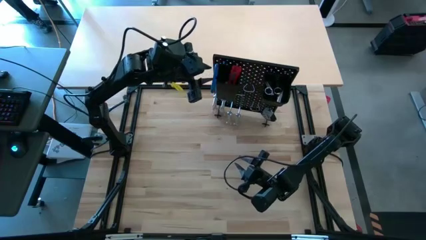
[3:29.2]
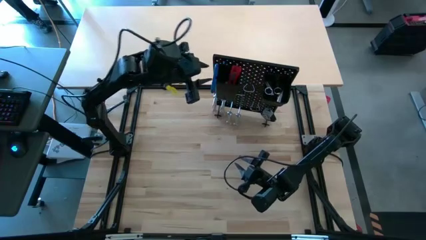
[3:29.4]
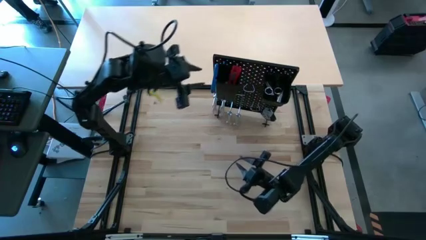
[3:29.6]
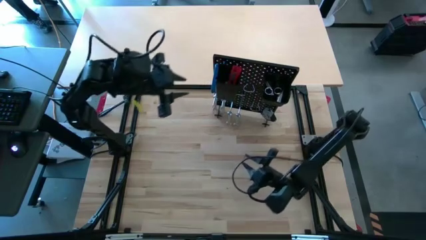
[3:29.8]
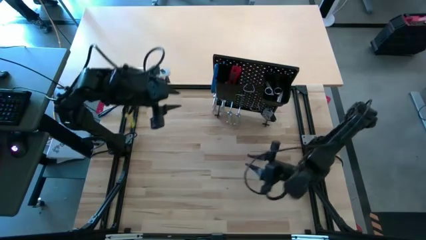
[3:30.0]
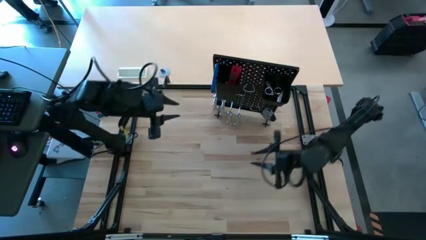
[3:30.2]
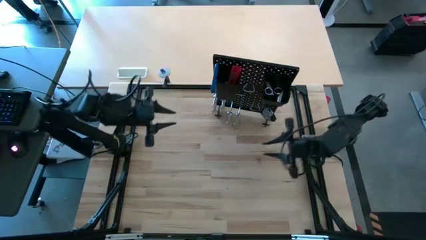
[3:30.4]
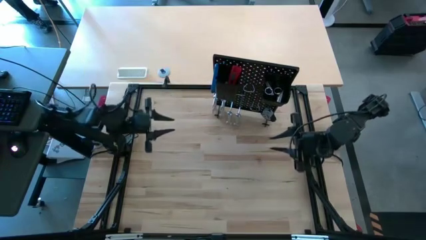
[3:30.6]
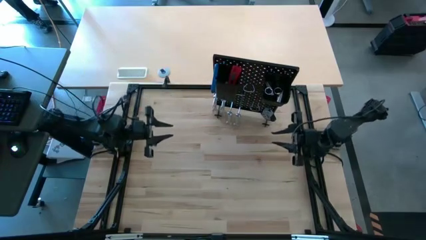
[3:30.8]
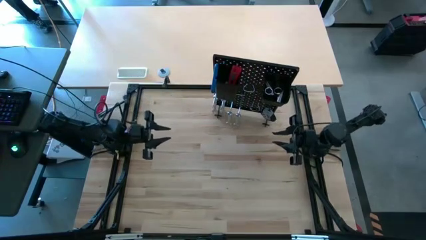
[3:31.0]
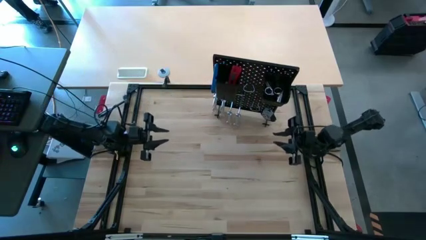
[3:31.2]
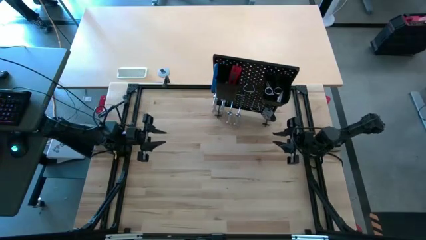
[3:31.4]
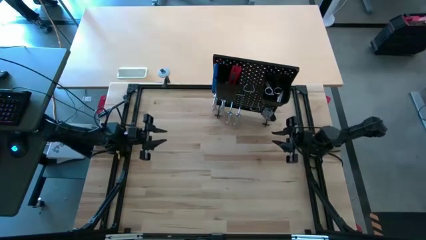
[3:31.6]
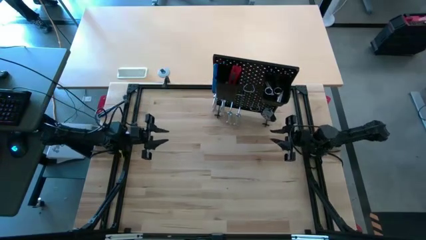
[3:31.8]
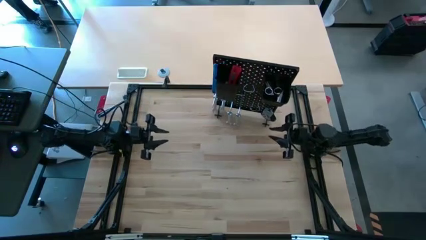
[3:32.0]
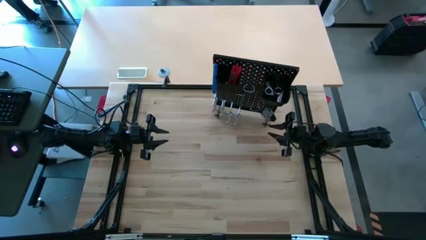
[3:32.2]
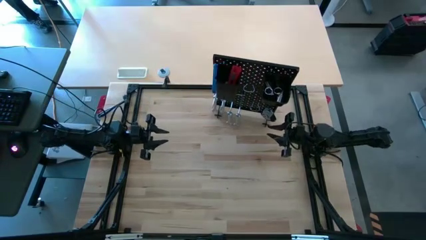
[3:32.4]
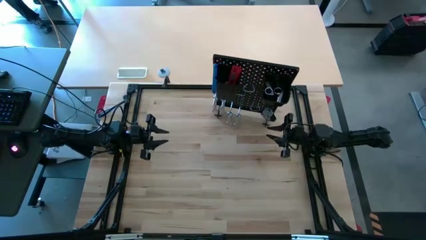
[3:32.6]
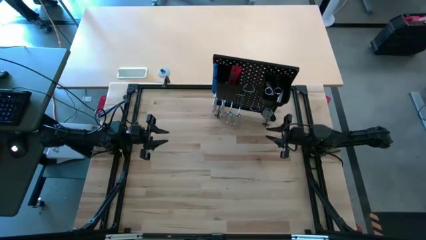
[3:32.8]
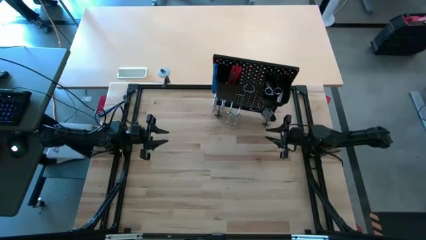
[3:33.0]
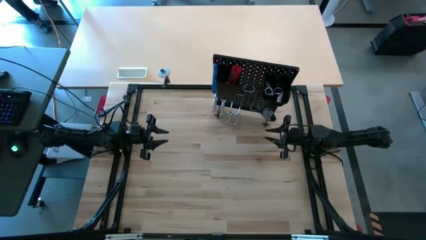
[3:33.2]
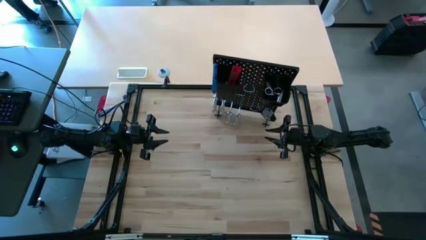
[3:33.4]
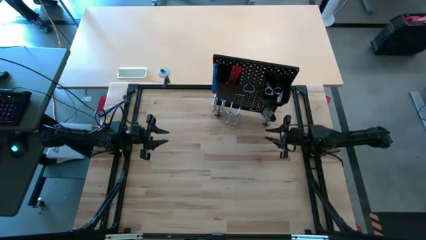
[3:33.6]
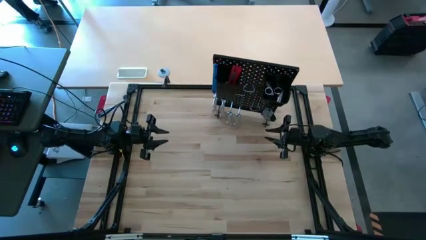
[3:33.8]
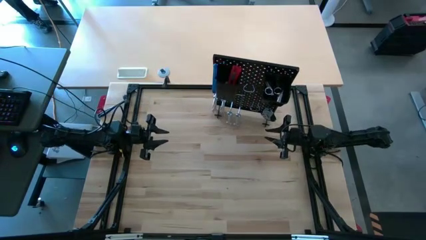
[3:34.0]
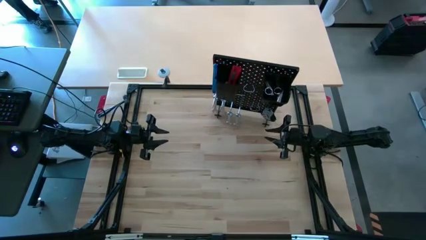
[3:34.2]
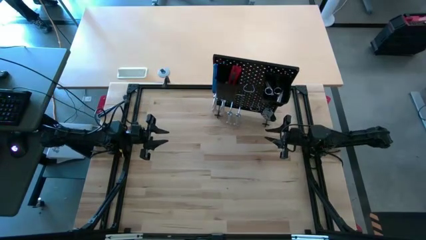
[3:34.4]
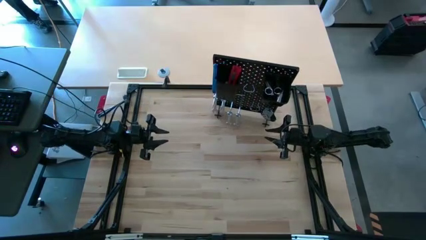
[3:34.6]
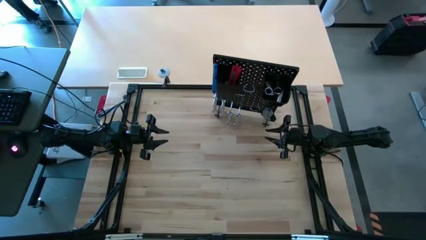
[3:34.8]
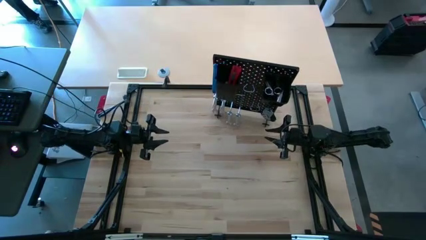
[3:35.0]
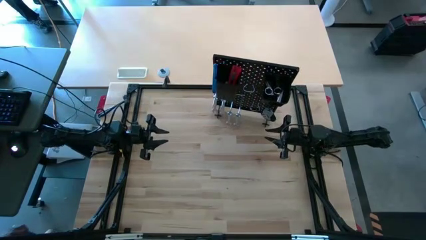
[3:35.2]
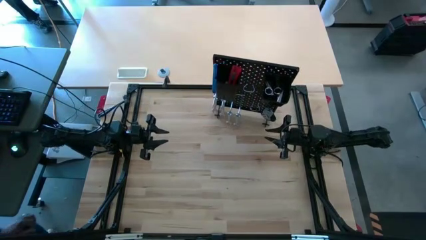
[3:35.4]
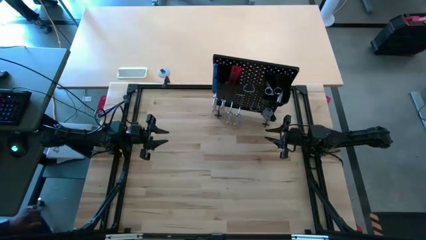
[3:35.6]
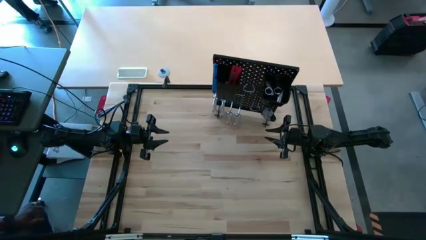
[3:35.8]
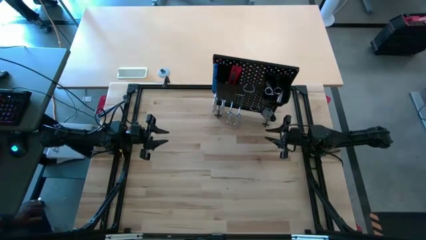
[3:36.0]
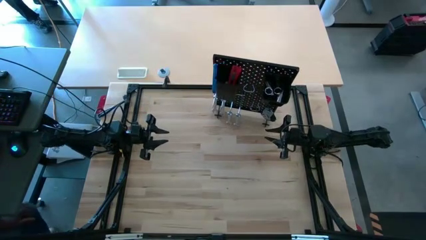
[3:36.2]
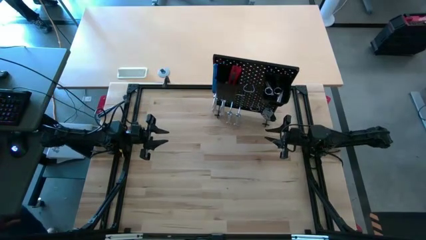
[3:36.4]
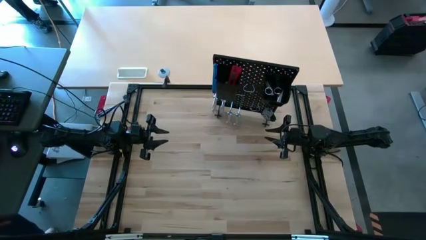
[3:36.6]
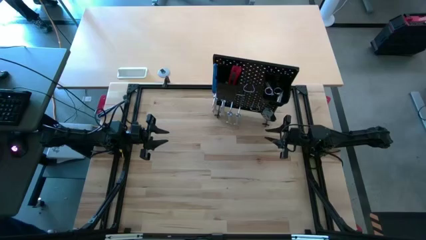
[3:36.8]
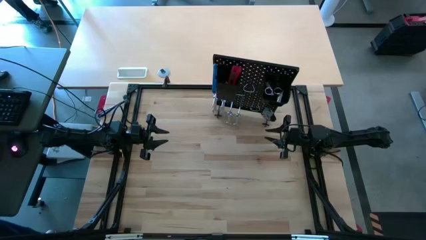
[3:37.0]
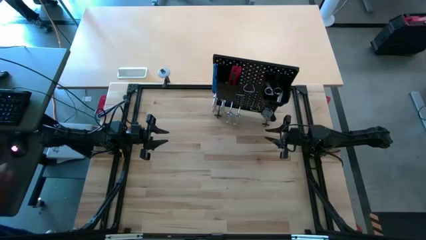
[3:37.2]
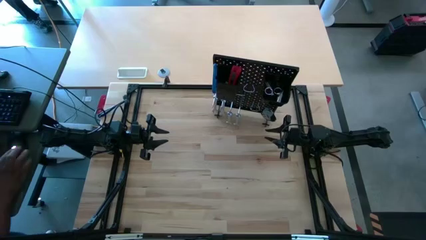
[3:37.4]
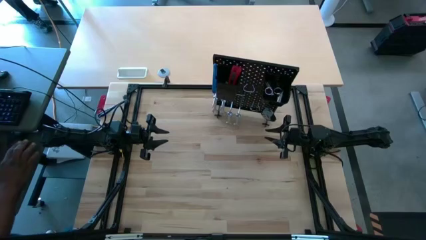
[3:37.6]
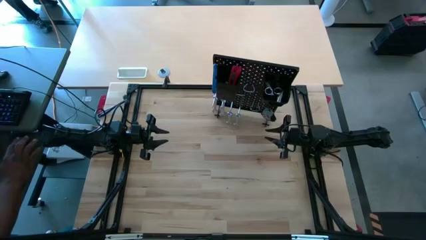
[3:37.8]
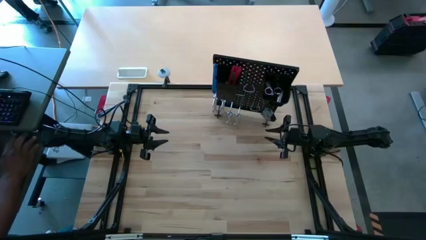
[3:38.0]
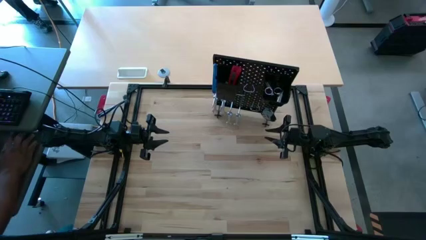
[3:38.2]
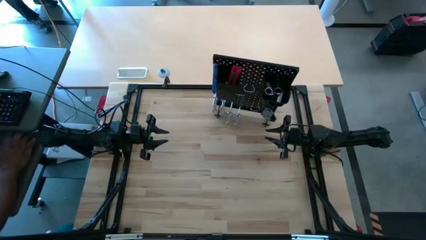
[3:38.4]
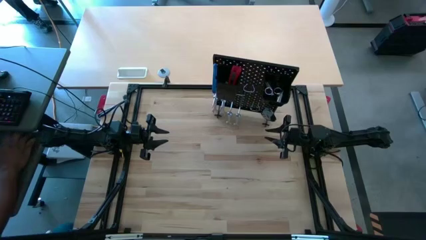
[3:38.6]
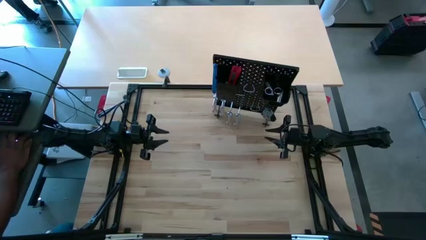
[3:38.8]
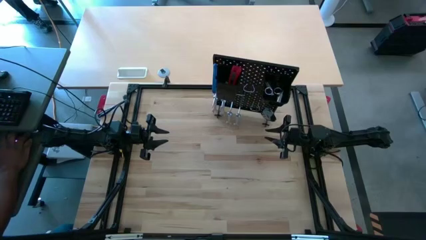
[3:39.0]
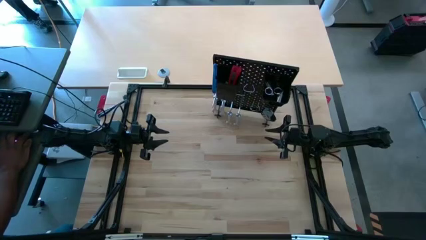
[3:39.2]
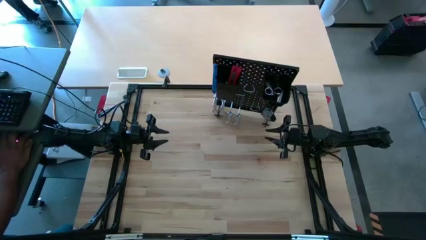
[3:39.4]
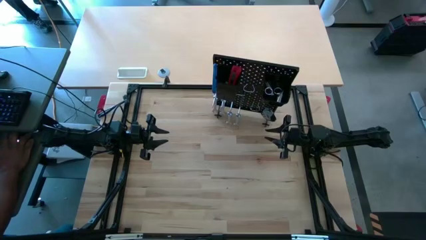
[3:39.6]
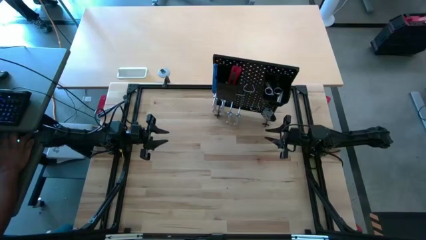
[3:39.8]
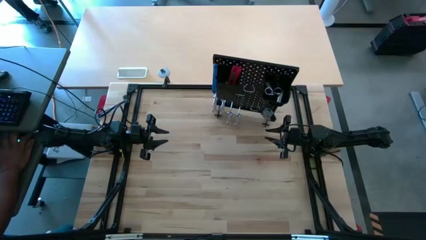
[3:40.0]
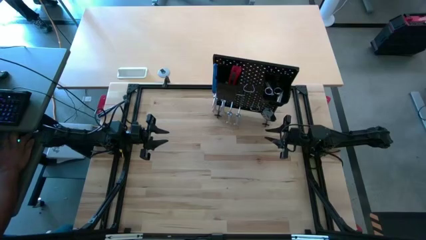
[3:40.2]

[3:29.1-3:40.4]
Task: Hang tools onto peg board
Return to Home Position

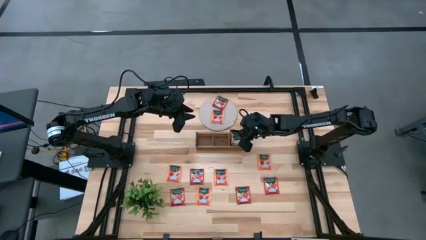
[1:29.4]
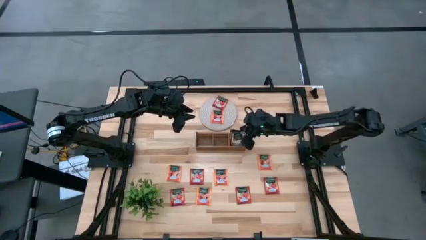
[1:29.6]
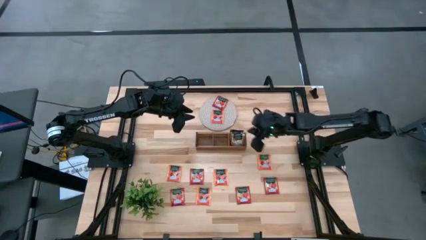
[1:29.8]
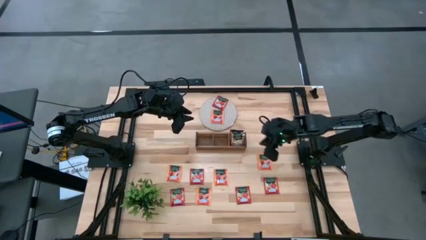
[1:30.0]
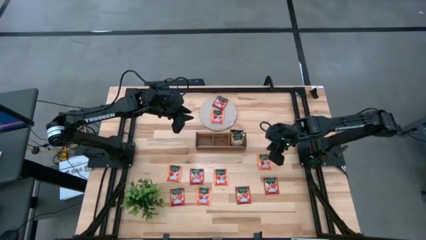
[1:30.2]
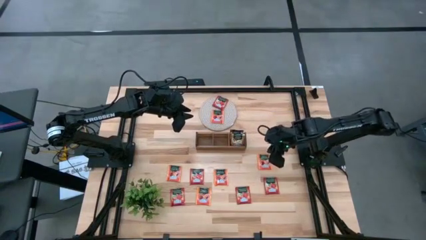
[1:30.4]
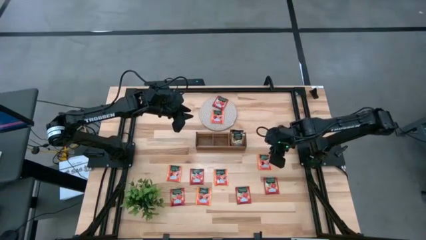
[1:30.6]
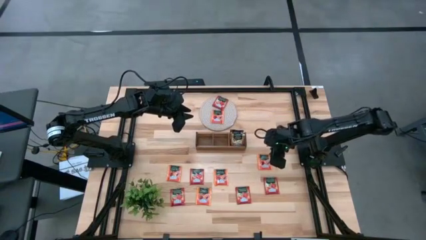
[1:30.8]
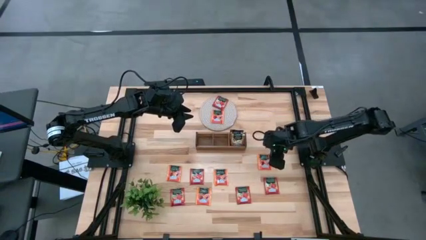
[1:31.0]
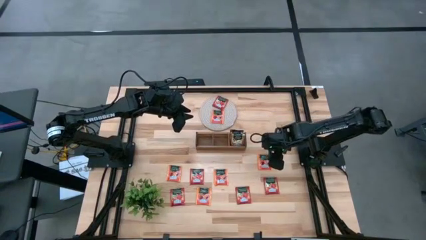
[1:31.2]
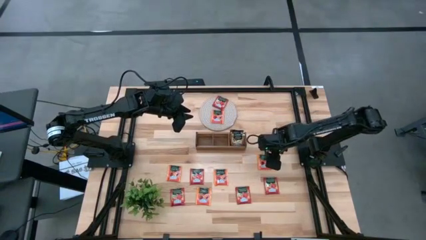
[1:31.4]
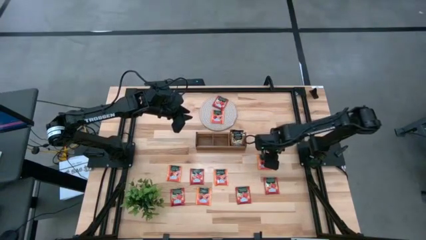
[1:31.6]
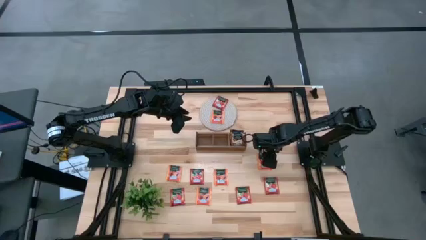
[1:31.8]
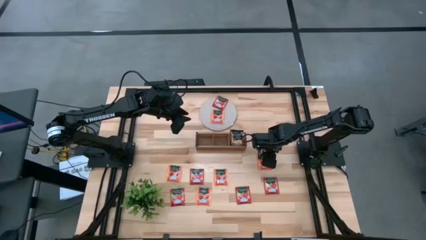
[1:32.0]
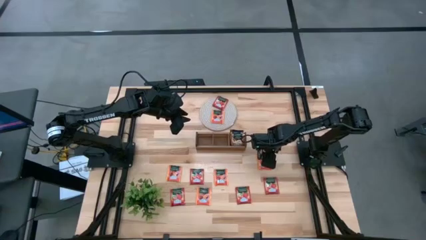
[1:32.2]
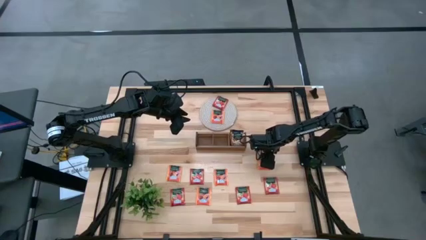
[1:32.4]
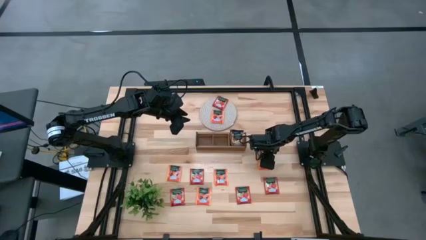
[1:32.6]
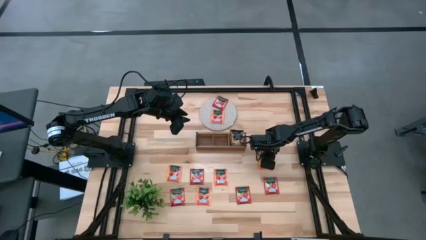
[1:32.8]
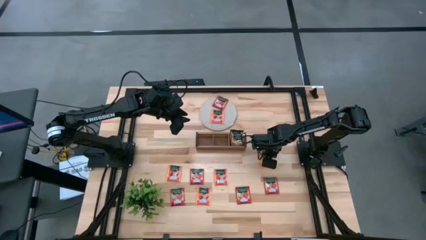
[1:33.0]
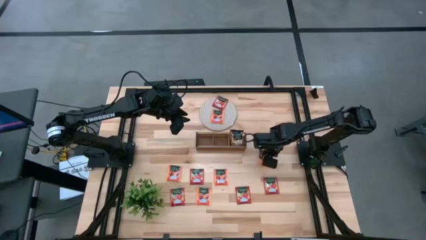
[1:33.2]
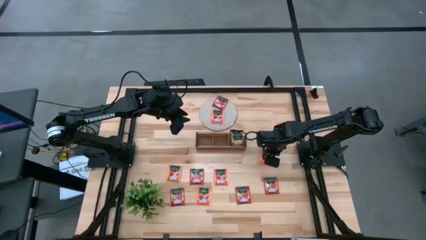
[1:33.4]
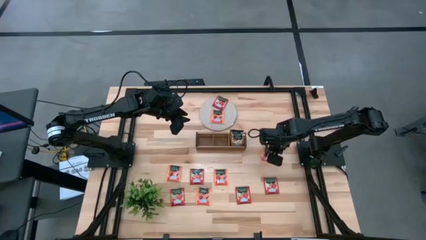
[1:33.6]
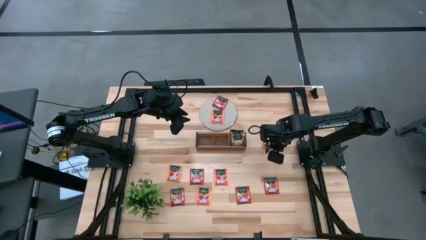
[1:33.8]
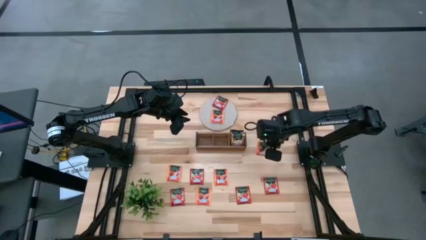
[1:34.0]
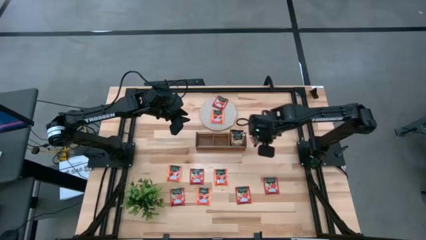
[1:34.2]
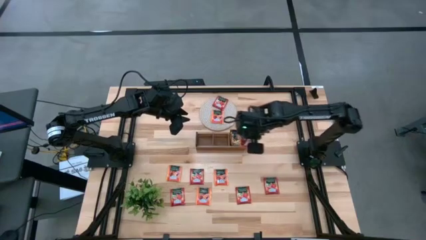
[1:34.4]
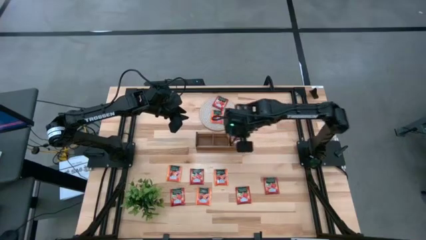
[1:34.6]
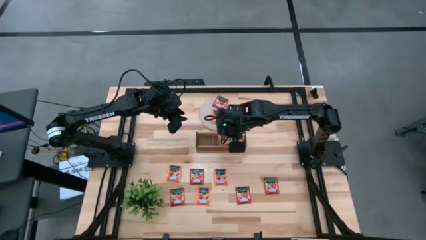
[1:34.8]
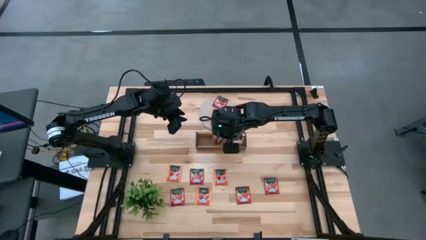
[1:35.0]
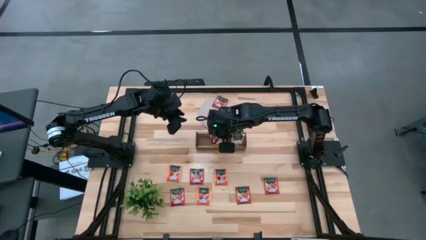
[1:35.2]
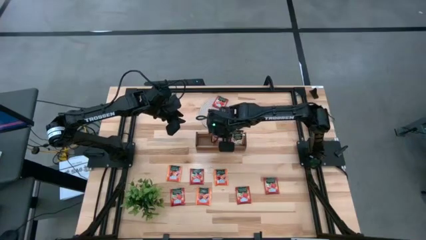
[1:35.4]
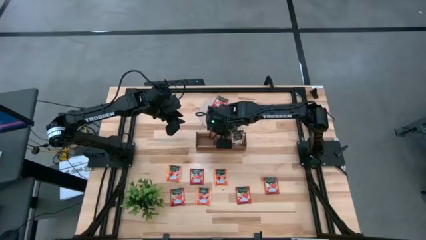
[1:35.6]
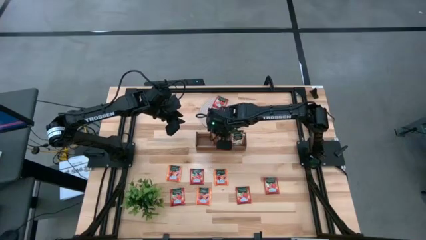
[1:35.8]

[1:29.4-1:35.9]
Task: Pick & Place Tea
Put the orange tea bag into the middle section of the wooden organizer
